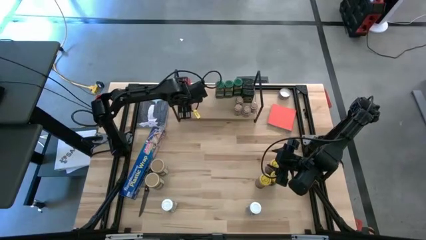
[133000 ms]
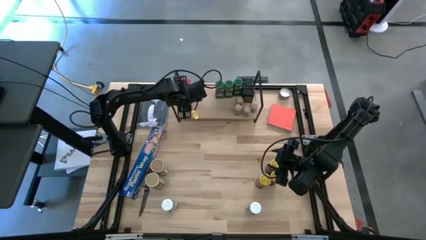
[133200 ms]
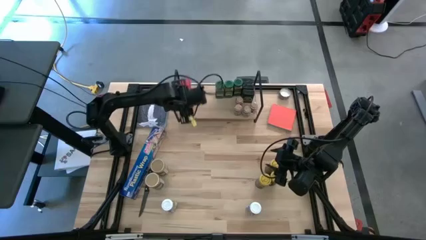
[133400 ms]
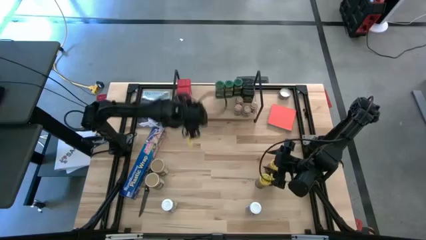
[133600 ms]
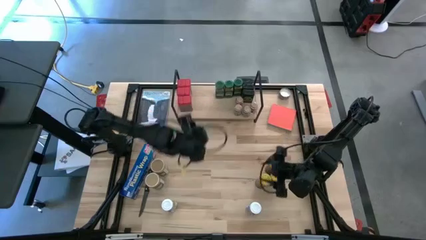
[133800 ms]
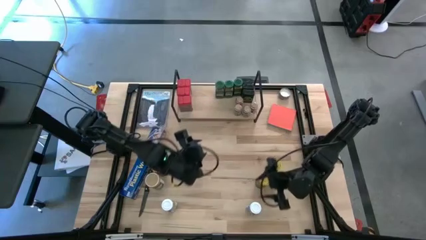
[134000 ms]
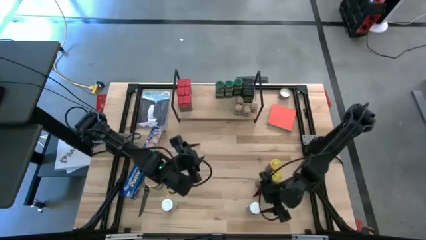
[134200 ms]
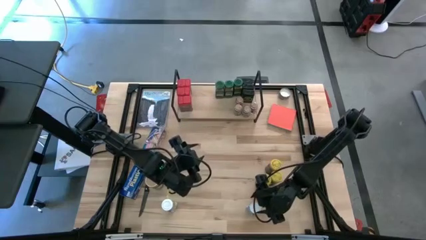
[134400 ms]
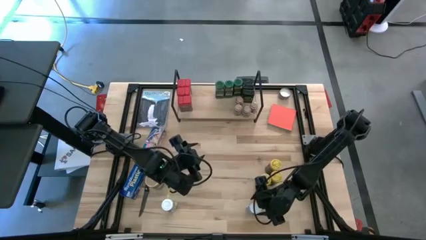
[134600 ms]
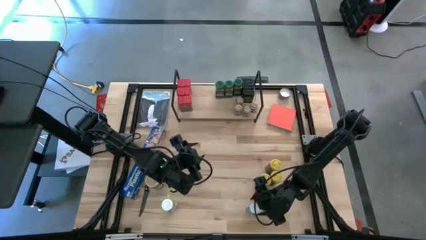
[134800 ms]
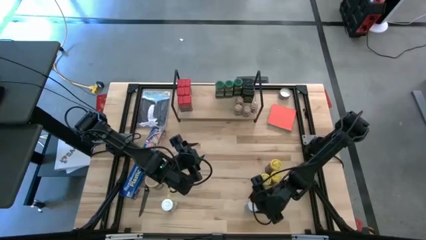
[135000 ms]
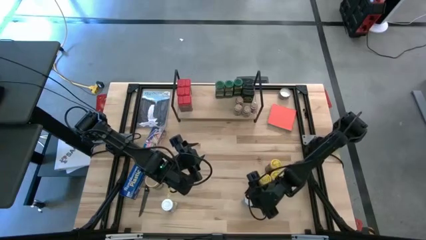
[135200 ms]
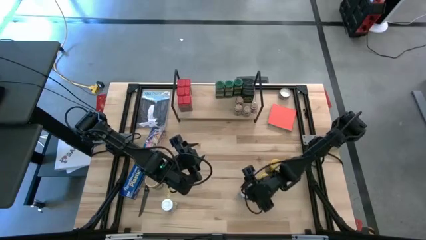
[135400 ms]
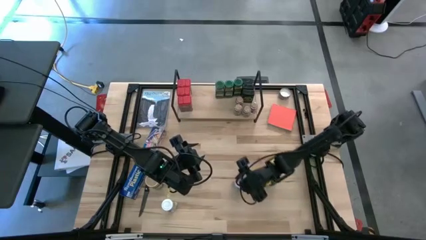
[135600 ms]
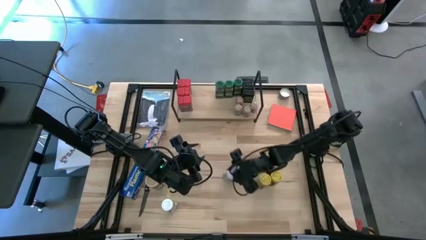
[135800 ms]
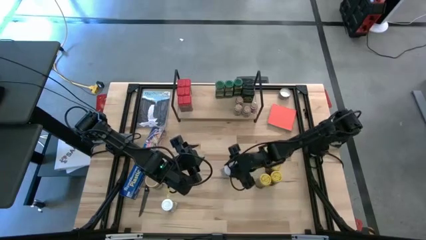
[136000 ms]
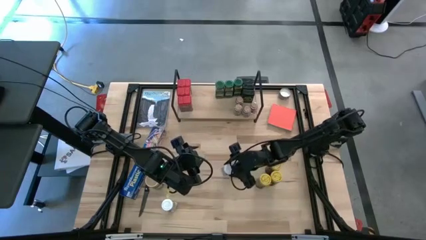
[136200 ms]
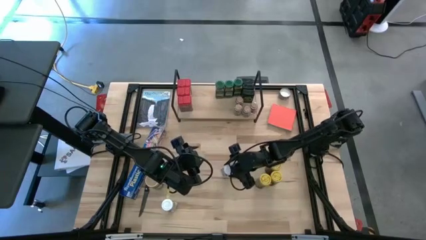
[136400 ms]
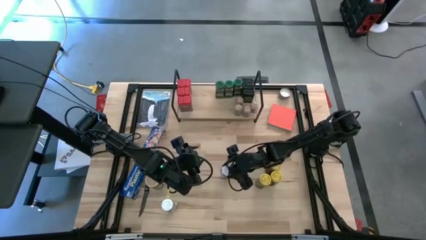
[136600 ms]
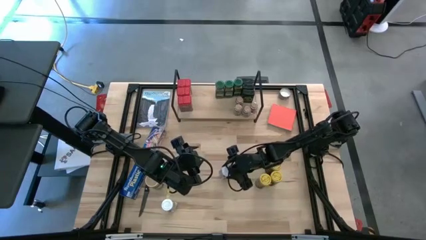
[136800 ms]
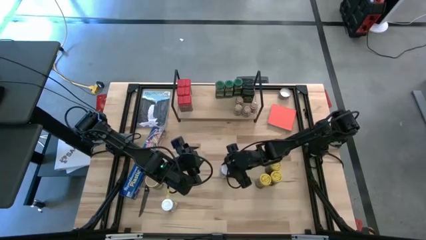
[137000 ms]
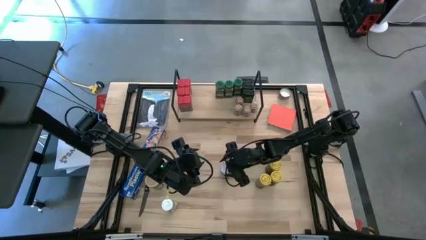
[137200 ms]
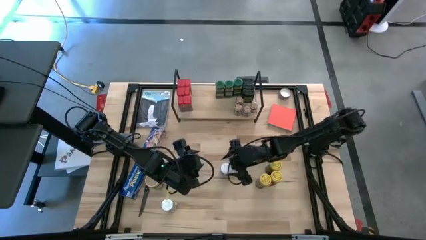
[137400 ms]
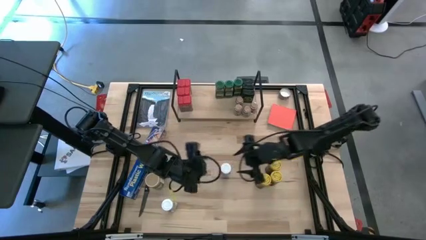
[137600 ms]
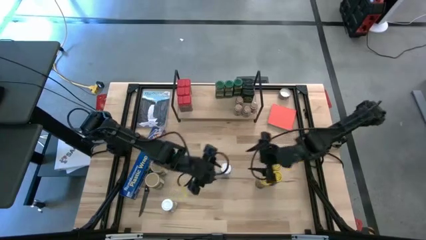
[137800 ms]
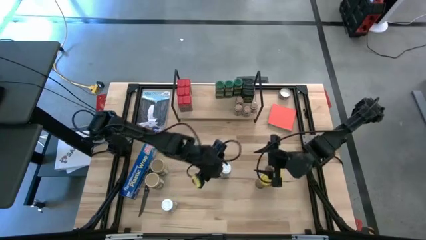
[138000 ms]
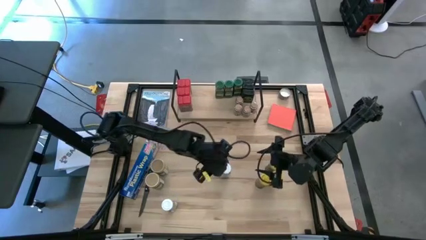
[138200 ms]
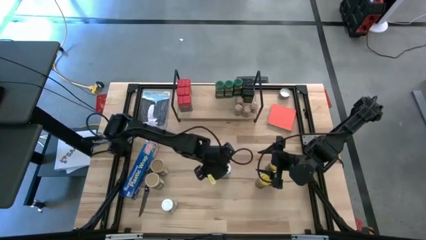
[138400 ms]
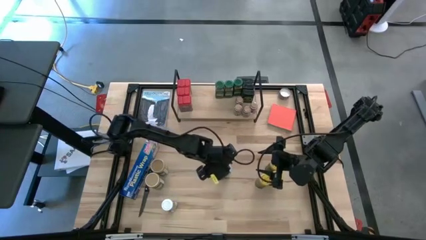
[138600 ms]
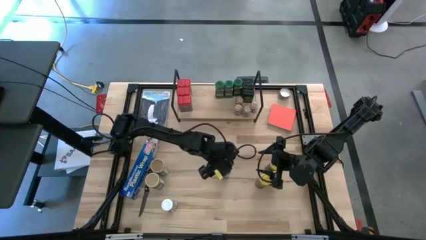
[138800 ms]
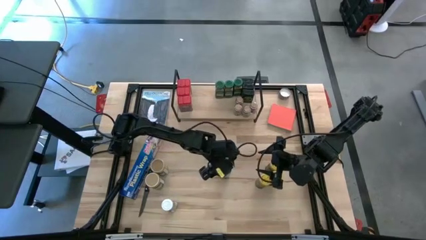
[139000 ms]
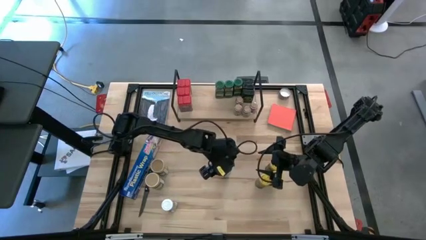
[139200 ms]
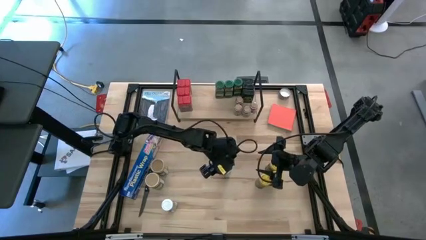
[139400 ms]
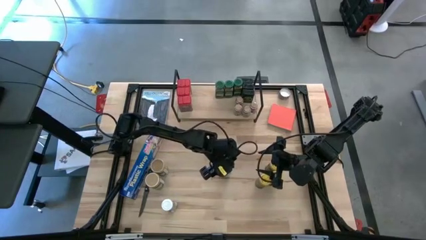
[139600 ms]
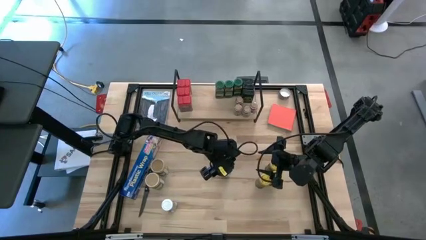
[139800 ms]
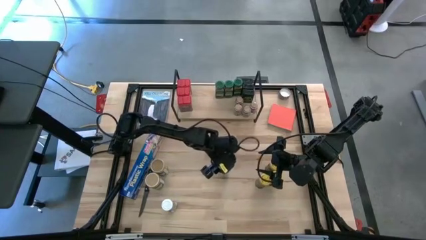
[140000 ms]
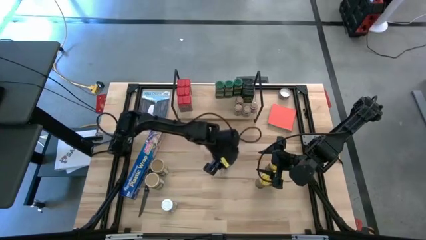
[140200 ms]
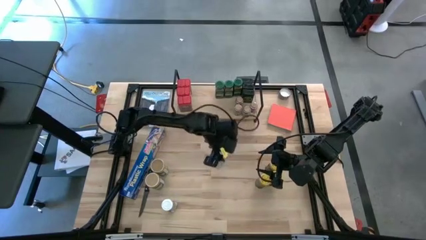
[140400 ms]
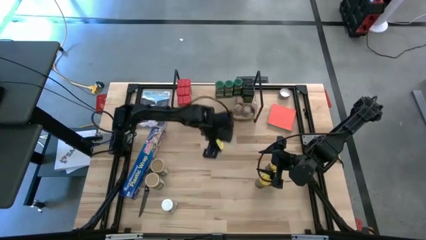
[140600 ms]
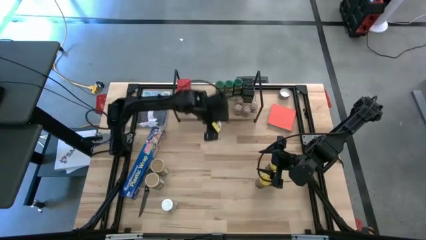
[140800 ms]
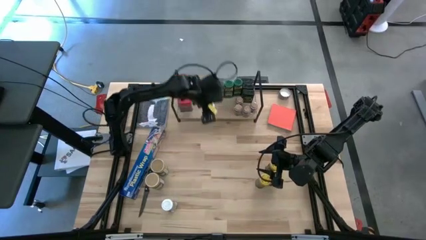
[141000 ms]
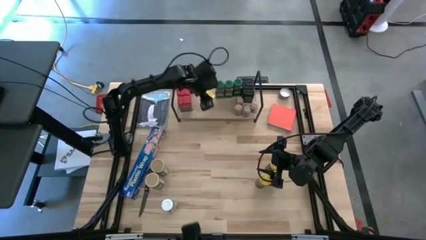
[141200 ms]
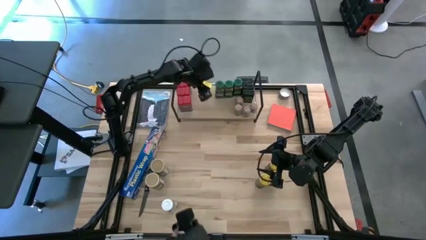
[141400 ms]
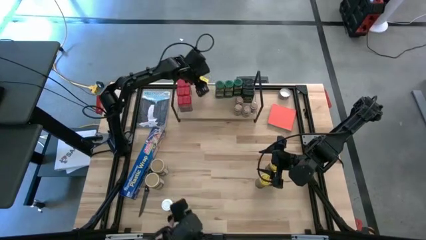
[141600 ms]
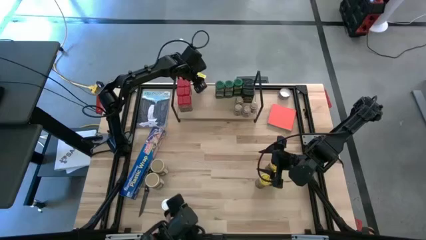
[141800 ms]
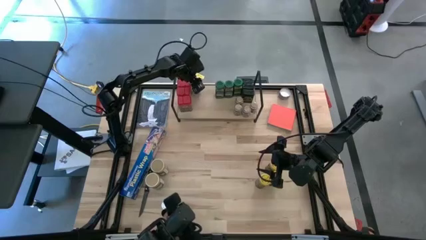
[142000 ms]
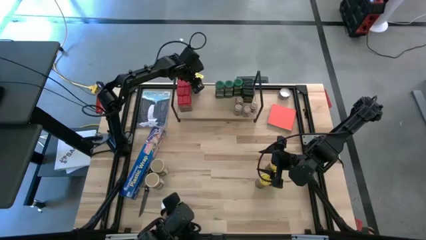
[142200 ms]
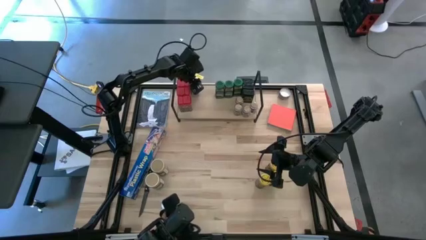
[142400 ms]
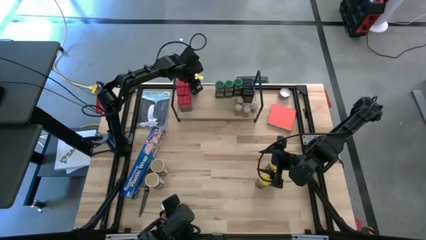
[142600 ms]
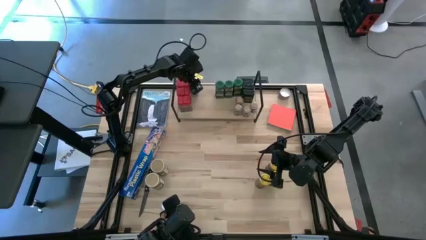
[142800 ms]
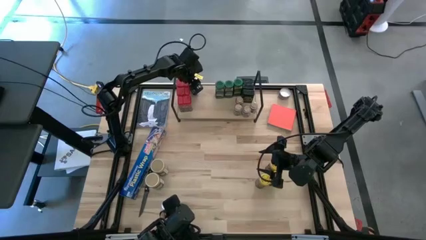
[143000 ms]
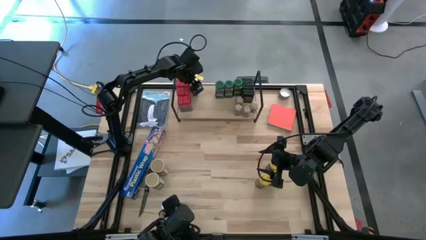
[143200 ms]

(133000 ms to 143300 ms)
Task: Shelf spices
Put the white seasoning bottle on the shelf

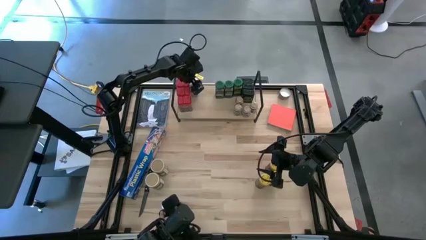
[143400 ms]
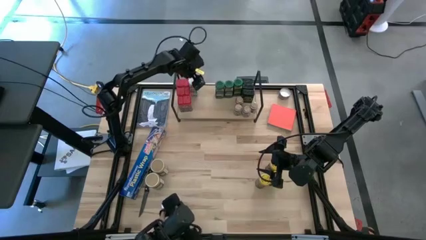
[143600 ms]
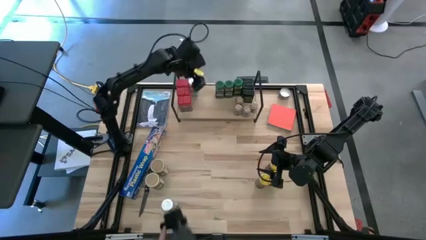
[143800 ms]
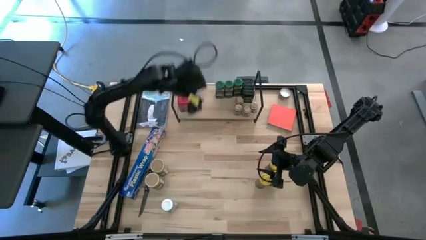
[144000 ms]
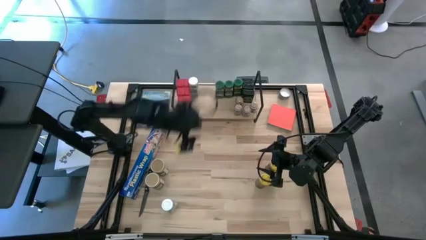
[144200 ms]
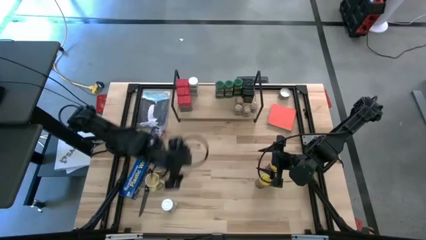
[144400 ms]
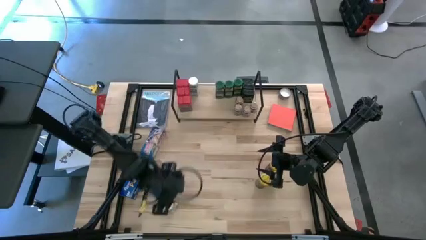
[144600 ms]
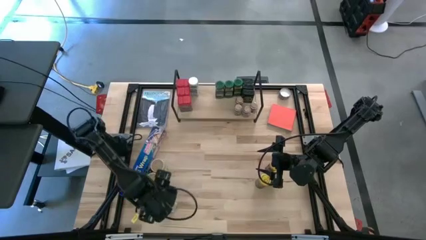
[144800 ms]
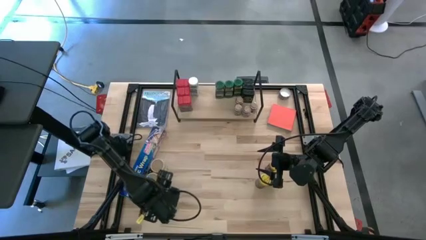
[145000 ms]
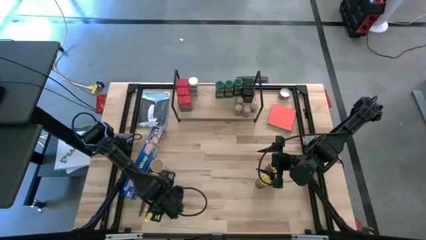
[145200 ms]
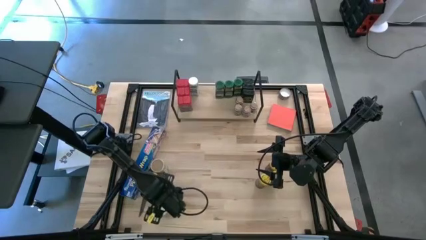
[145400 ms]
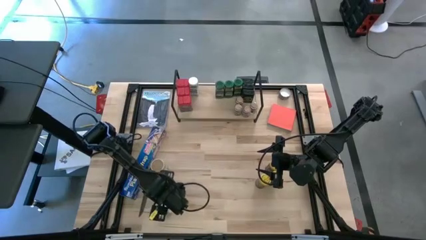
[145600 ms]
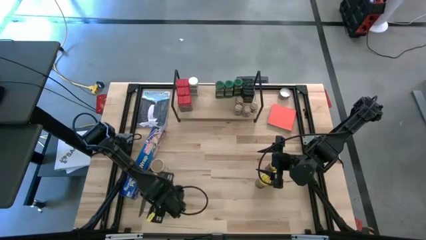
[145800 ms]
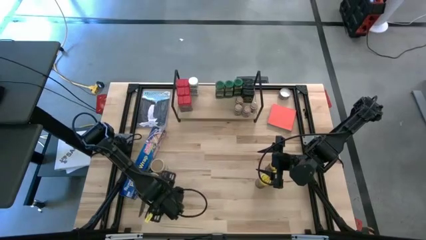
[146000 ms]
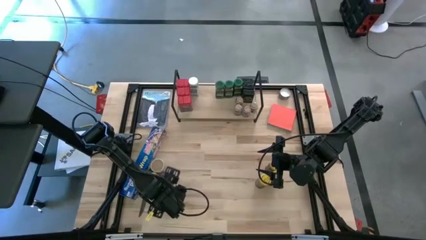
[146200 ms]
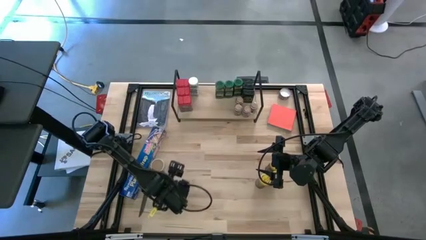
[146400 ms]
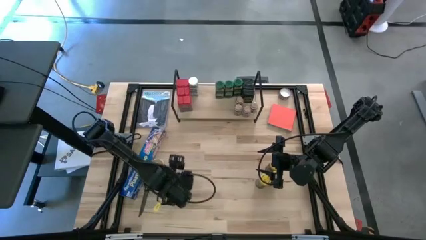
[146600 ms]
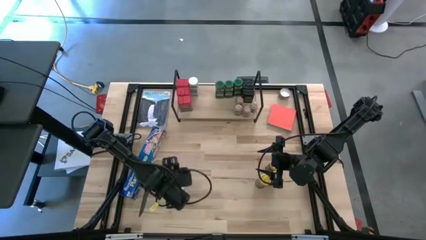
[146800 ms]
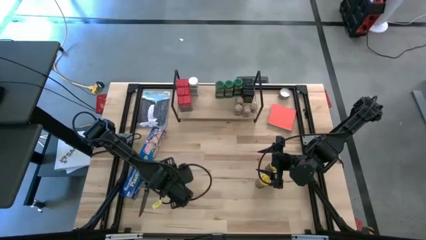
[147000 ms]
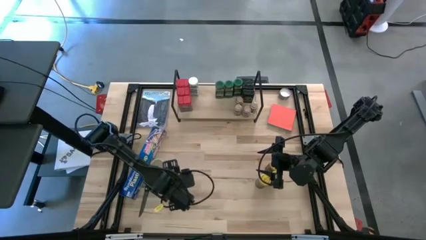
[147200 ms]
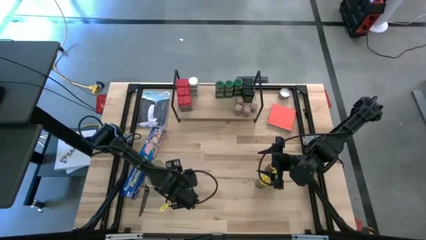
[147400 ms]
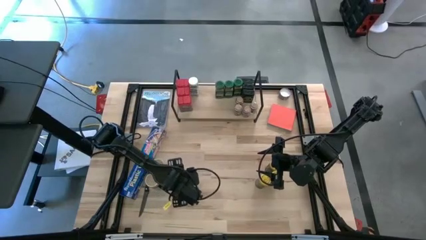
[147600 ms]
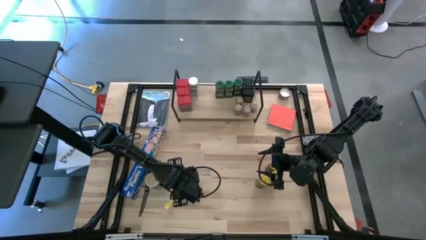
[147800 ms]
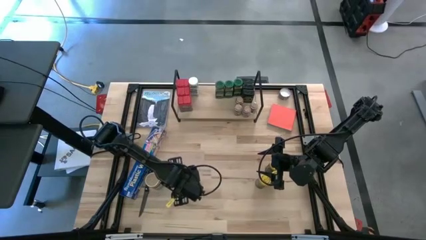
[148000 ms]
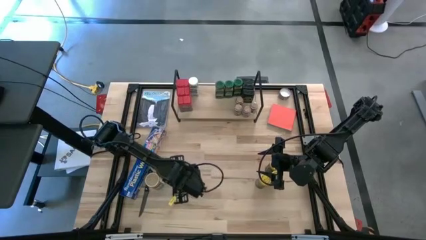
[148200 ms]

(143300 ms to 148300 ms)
Put the white seasoning bottle on the shelf
